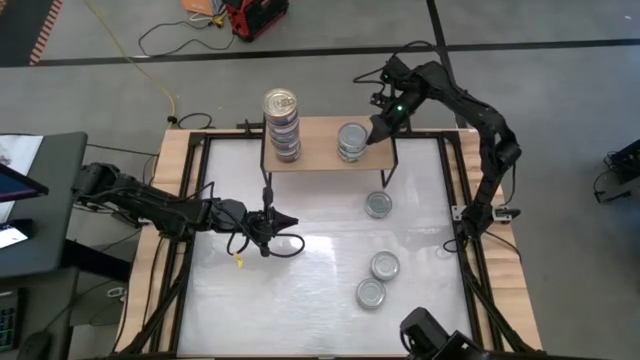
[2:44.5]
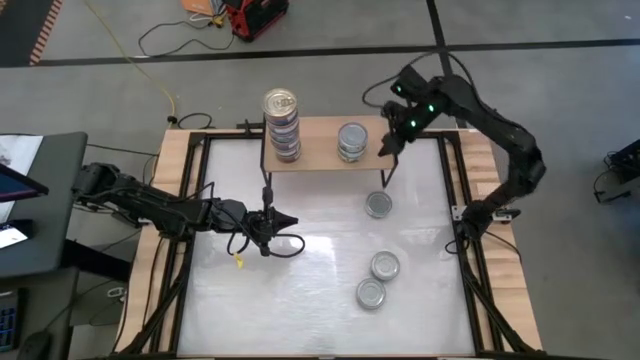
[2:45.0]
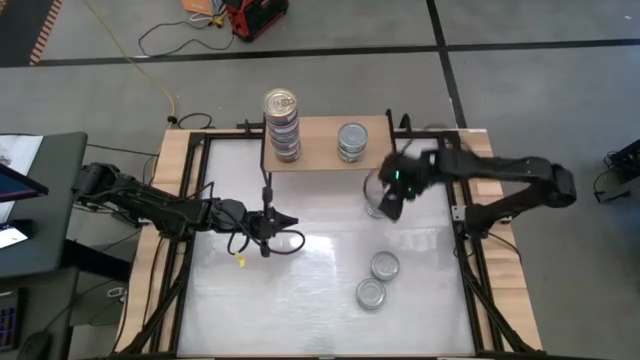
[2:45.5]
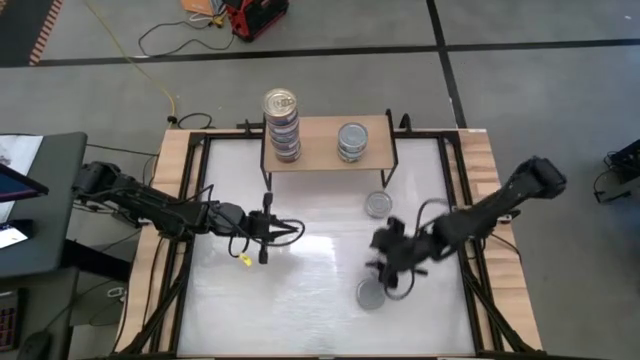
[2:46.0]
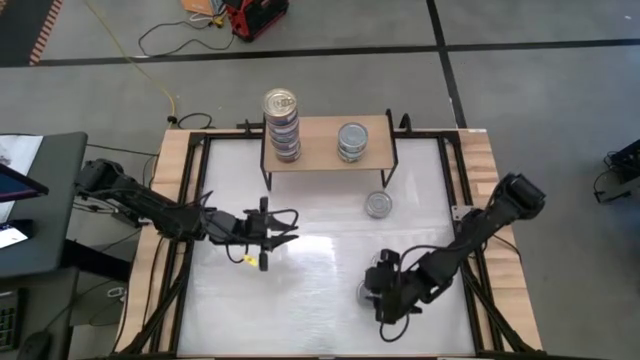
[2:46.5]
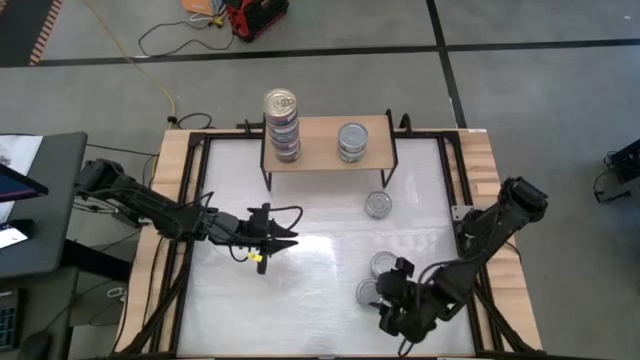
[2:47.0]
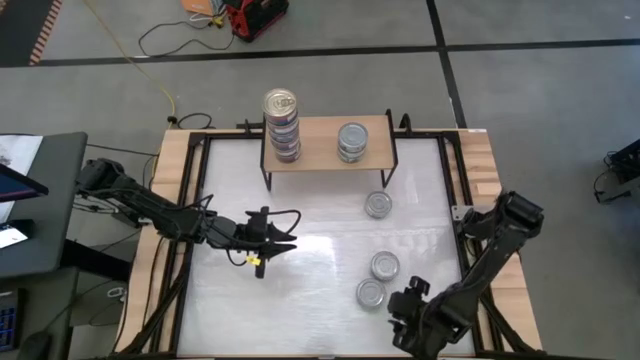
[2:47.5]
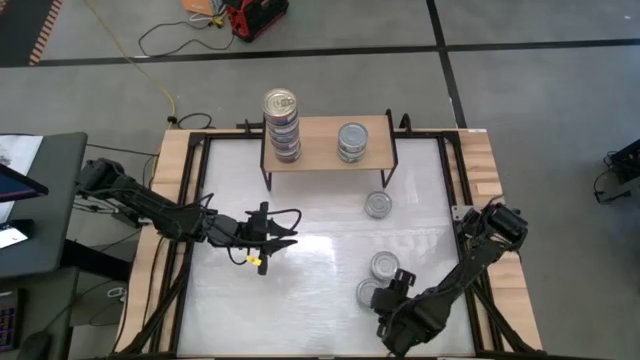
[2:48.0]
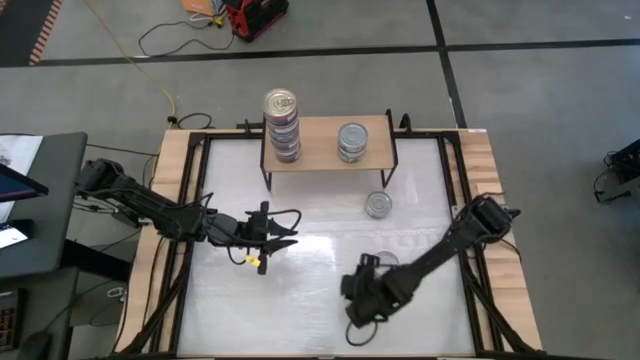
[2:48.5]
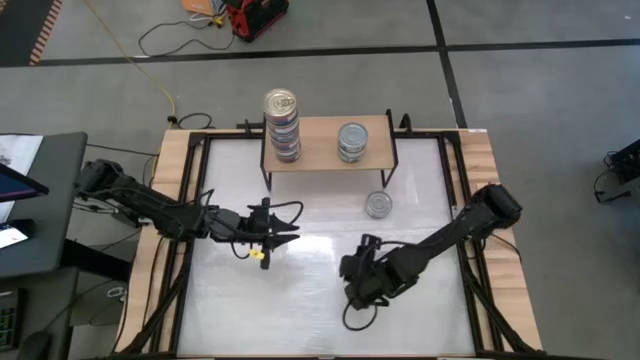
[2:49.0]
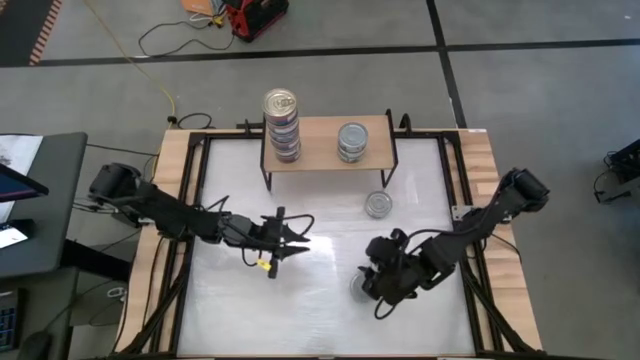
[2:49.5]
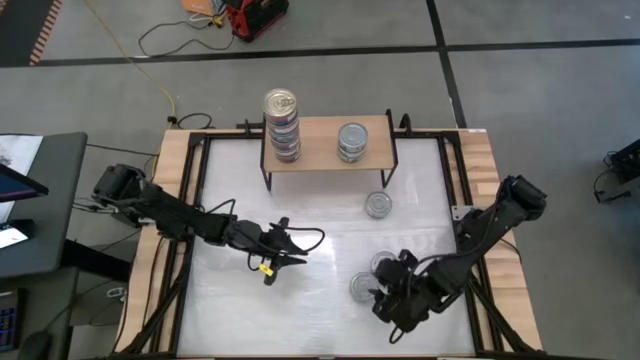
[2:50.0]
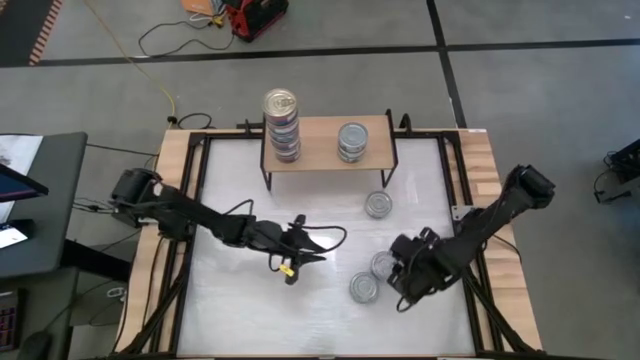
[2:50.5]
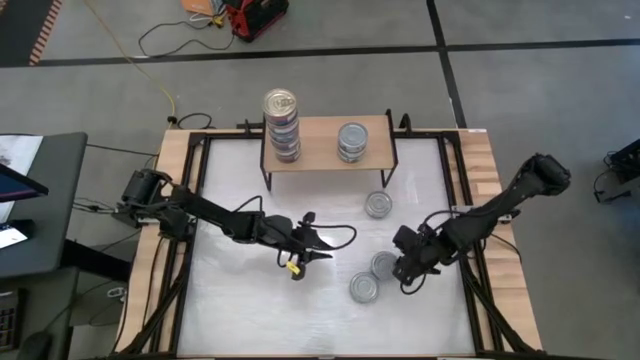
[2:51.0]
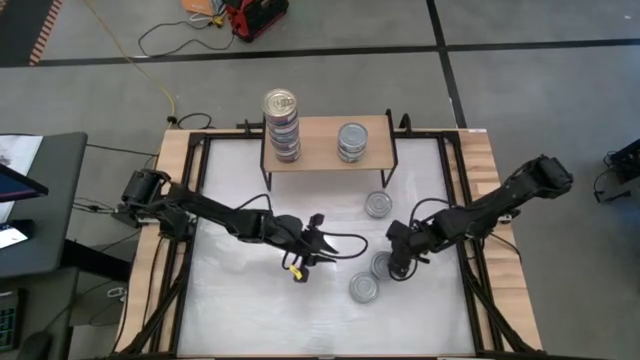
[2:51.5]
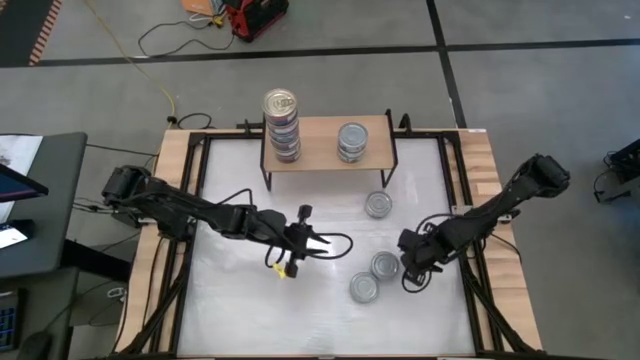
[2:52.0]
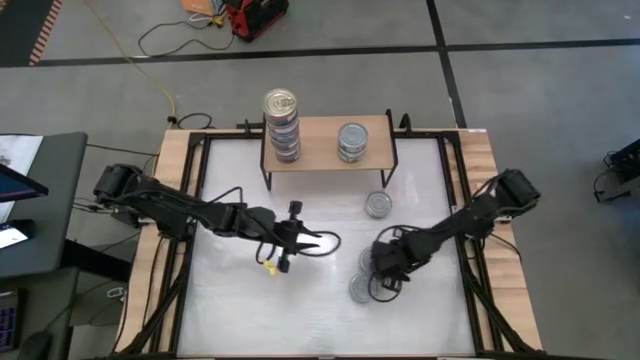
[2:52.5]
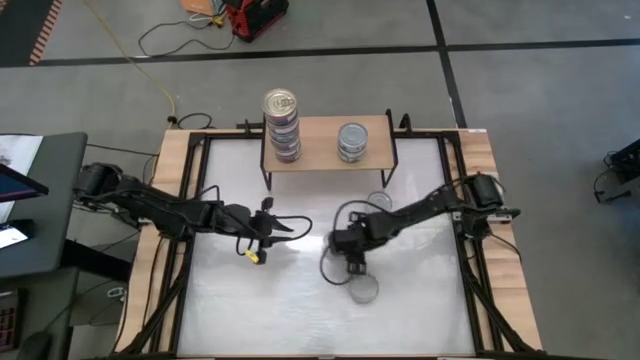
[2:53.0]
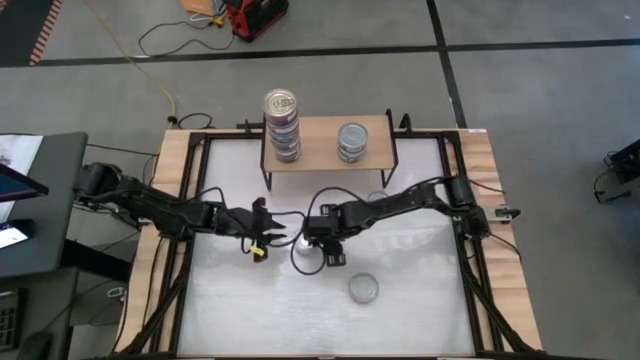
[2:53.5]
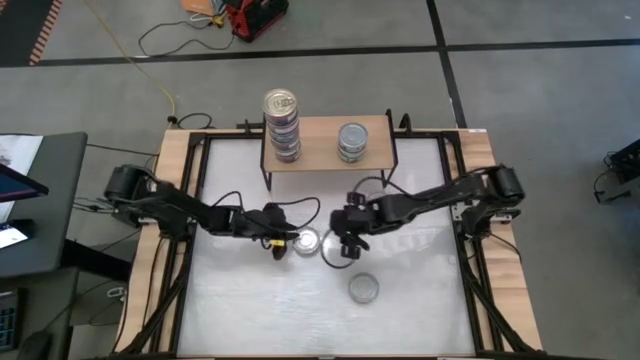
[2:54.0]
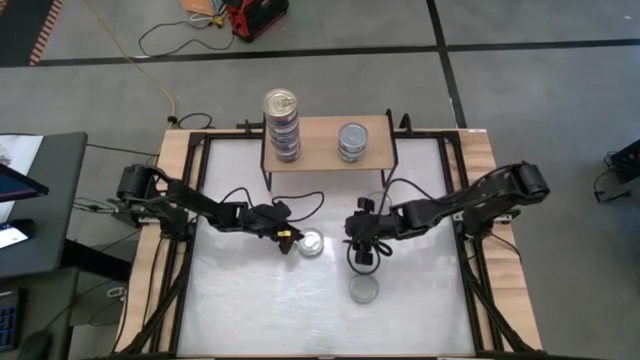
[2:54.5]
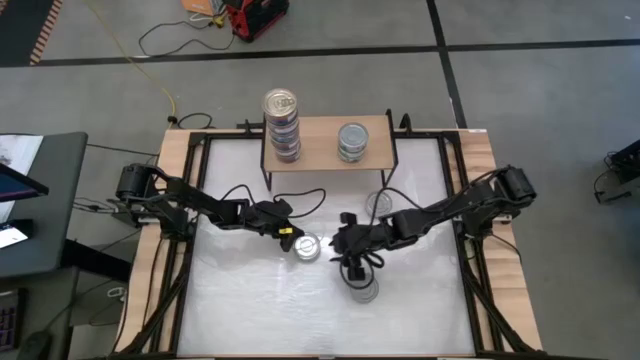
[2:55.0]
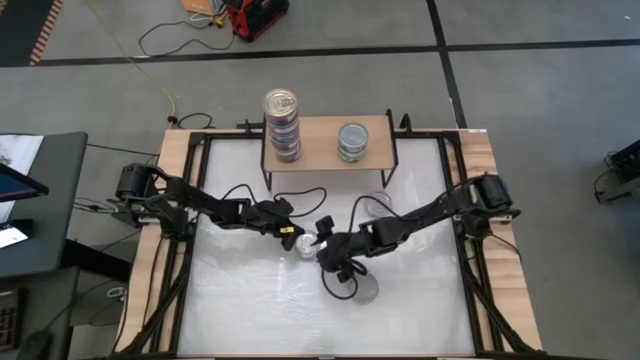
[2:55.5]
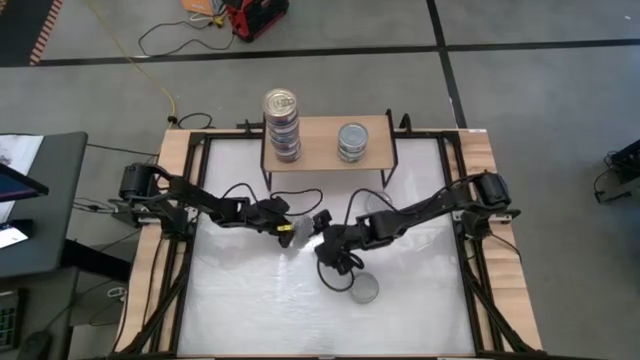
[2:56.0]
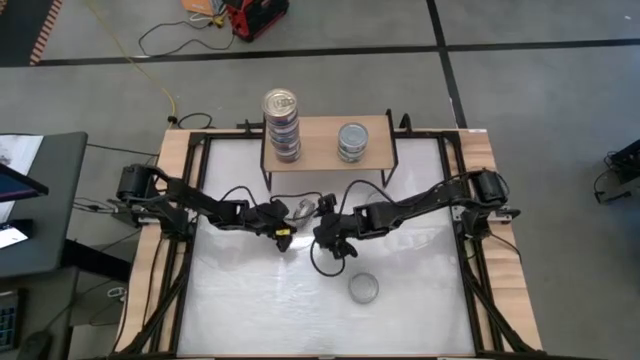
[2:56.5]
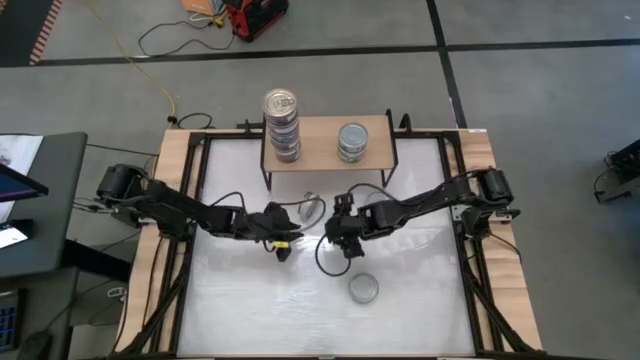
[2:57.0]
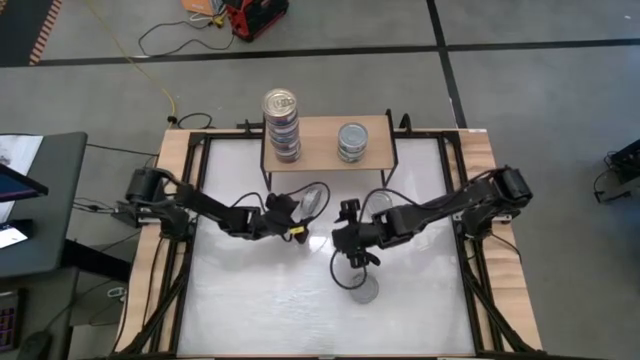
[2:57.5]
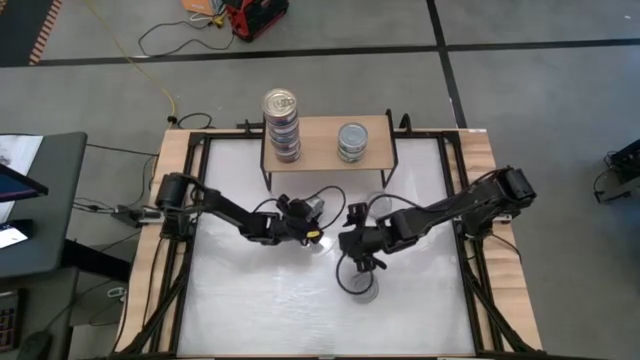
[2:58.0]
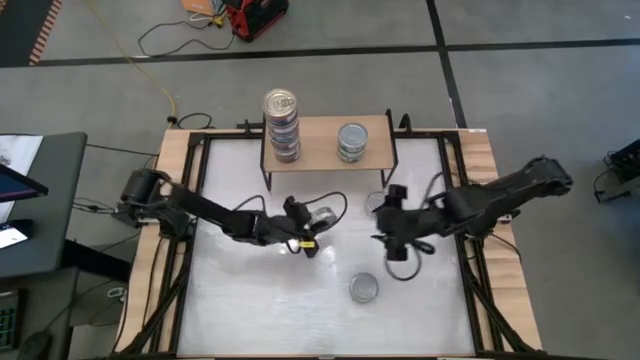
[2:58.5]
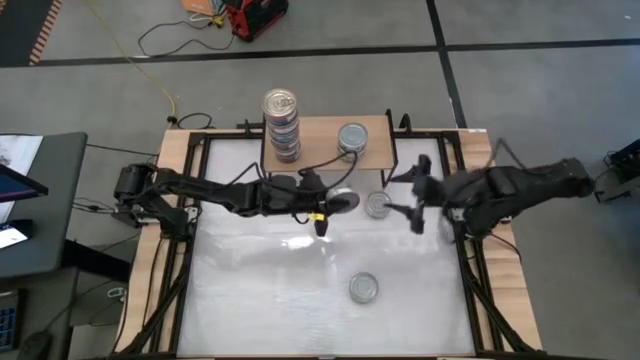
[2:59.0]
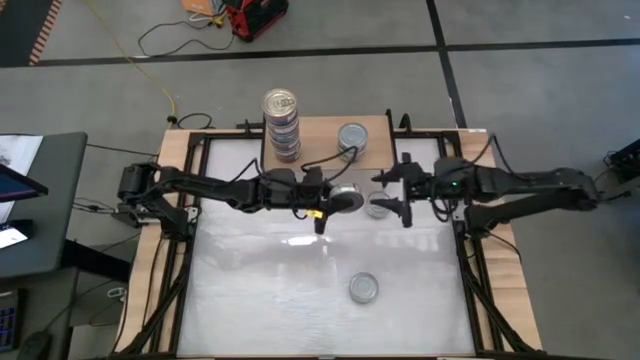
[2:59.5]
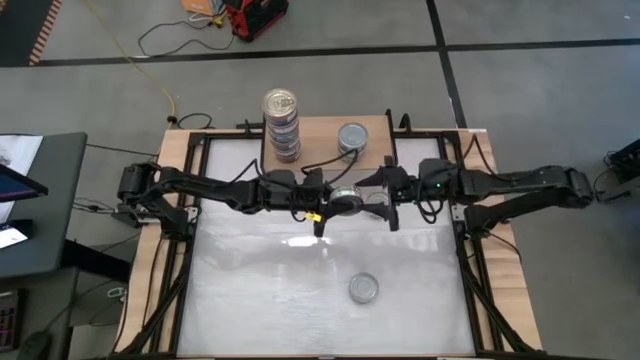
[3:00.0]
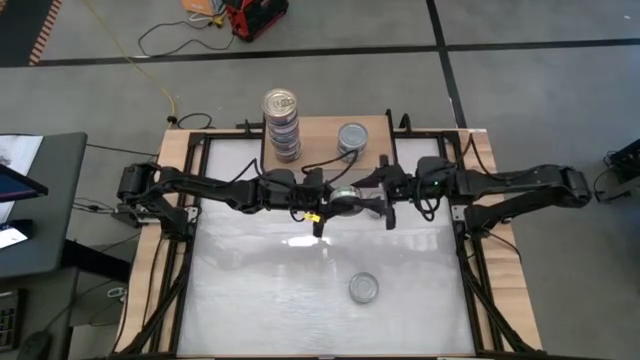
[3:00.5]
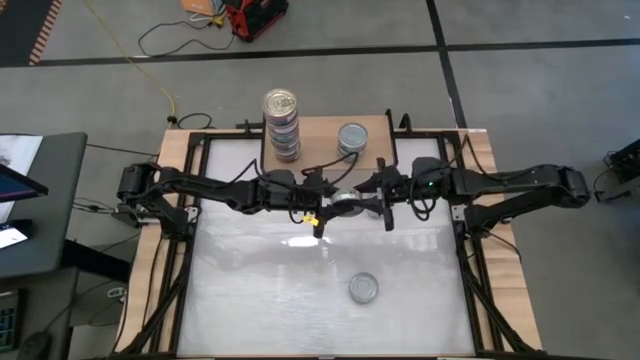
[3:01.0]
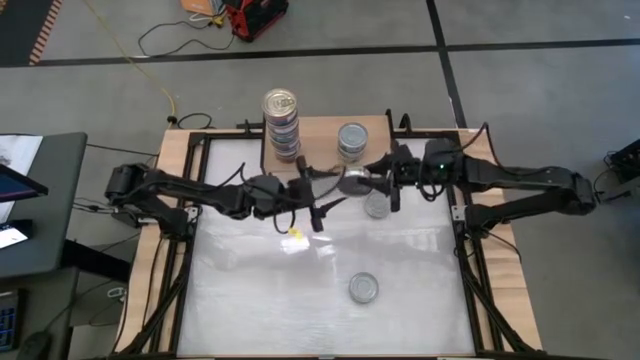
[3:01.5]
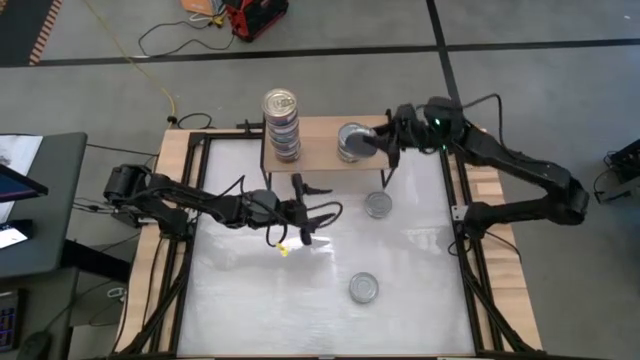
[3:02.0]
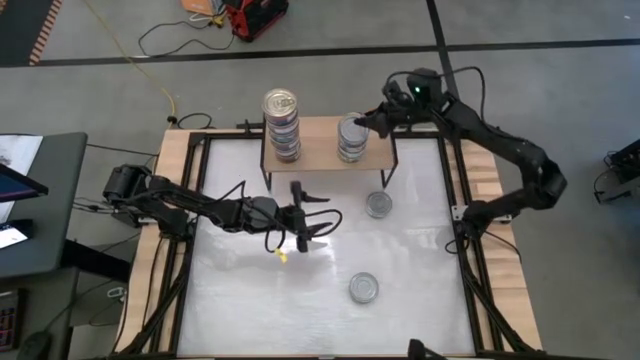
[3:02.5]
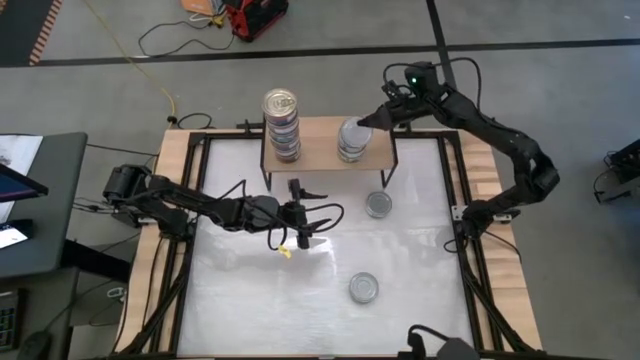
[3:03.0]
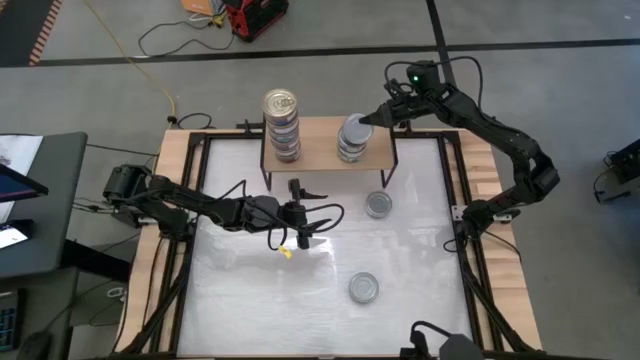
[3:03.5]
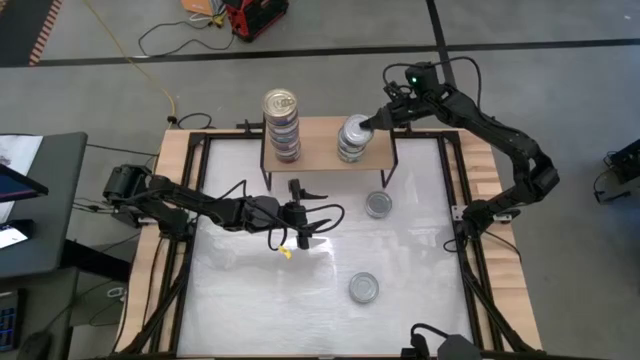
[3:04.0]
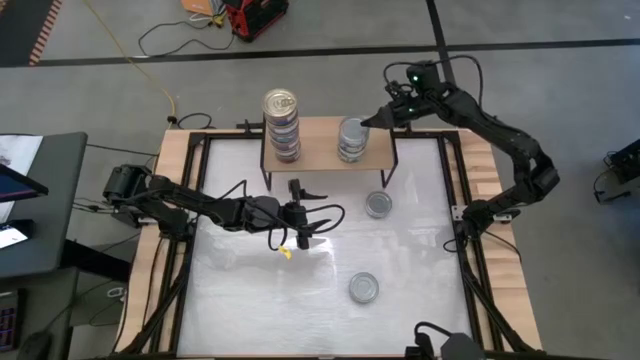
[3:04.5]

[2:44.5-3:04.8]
Task: Stack canned seafood by type on shelf
Stack the green tuna can on top of the green tuna can

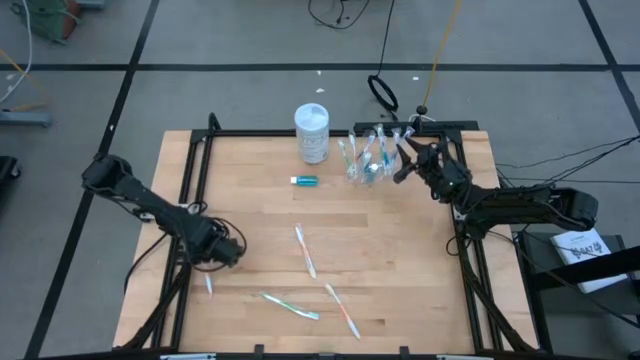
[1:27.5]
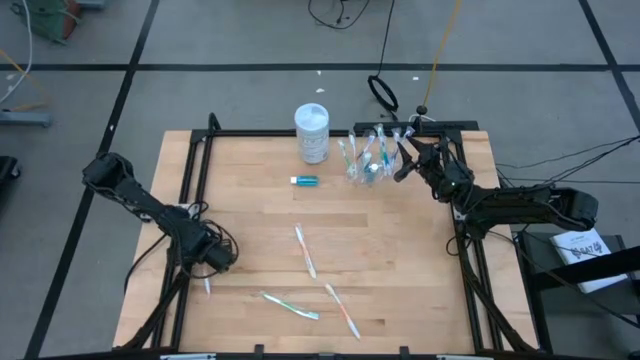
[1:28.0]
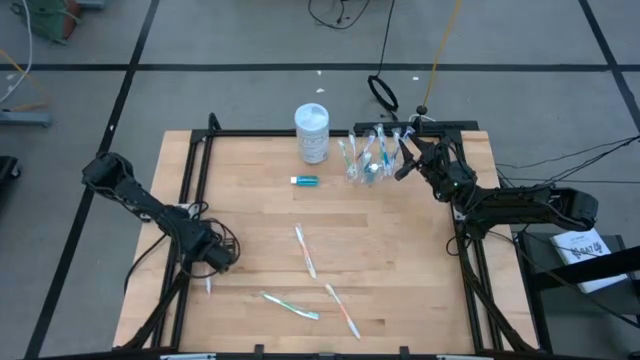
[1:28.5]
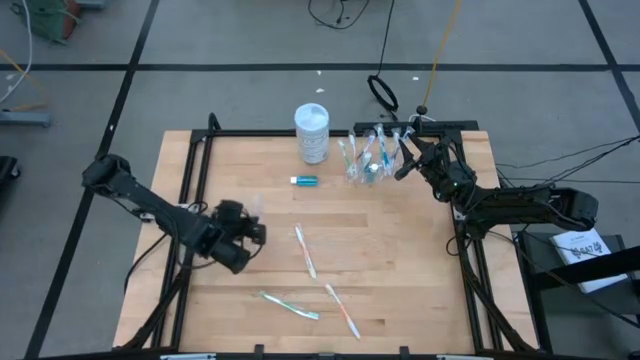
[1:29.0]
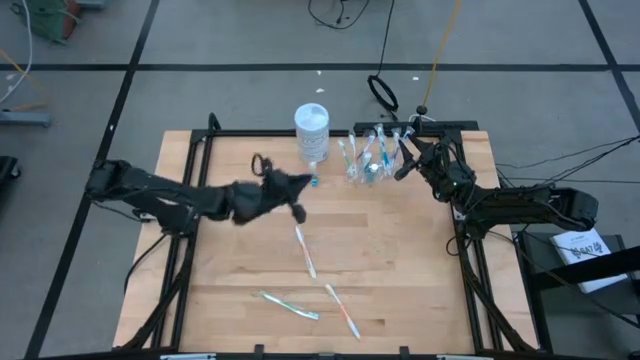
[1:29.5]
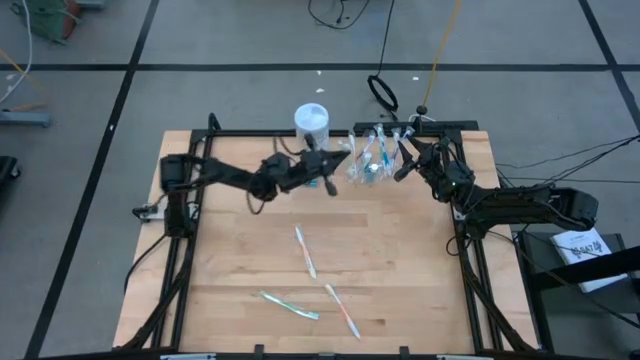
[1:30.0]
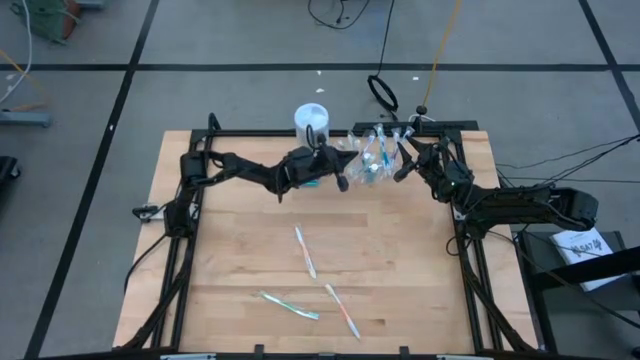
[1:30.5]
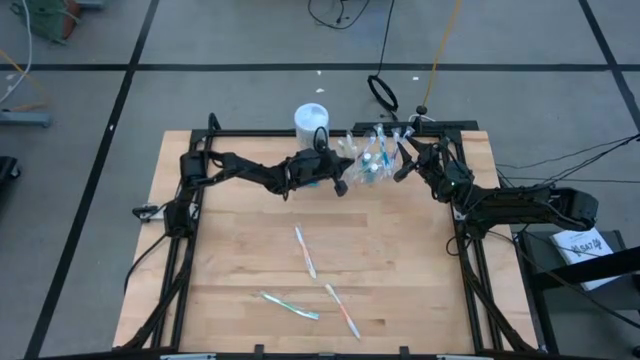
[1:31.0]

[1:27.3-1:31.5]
Task: Pick & Place toothbrushing station
Put the orange toothbrush into the transparent organizer
